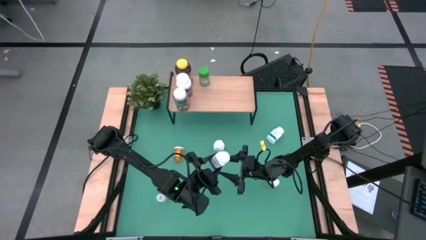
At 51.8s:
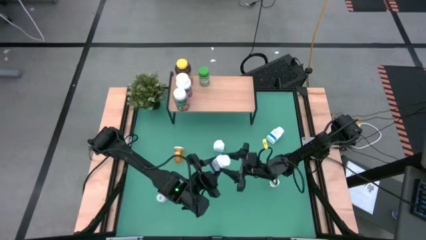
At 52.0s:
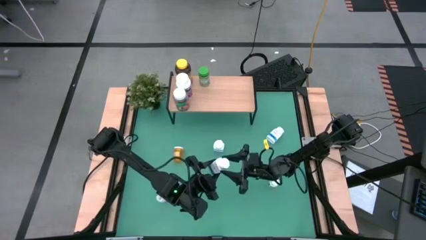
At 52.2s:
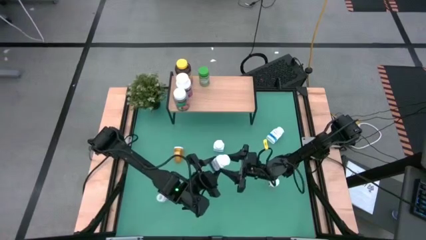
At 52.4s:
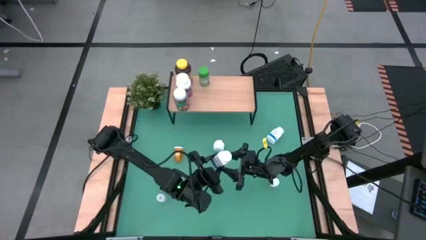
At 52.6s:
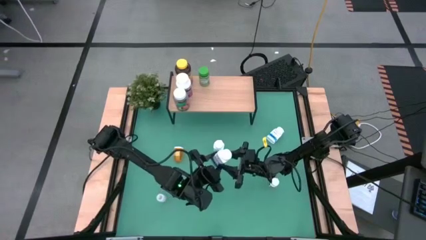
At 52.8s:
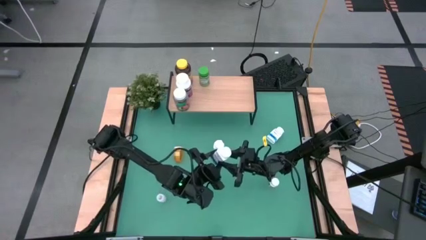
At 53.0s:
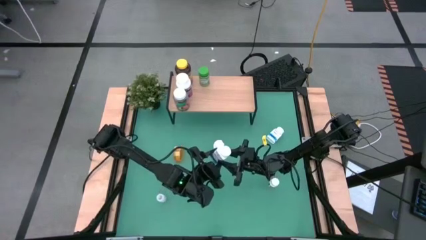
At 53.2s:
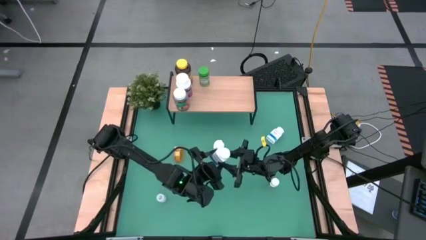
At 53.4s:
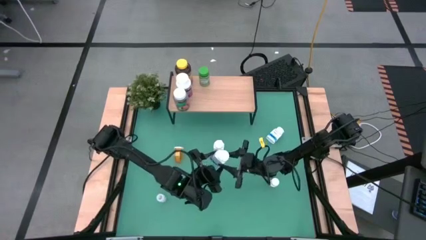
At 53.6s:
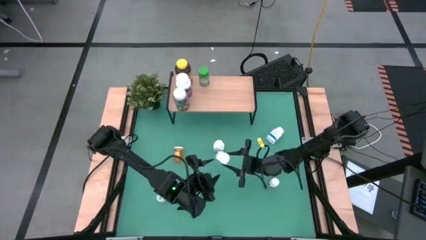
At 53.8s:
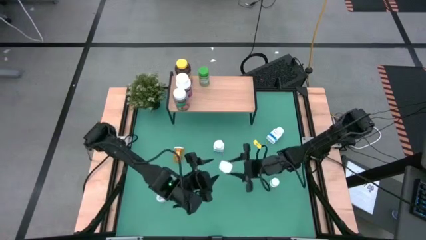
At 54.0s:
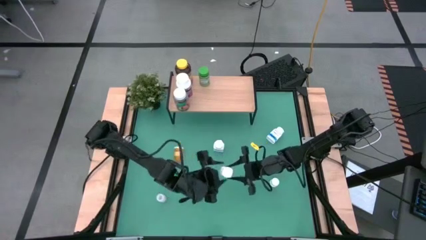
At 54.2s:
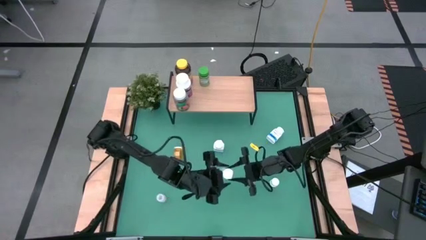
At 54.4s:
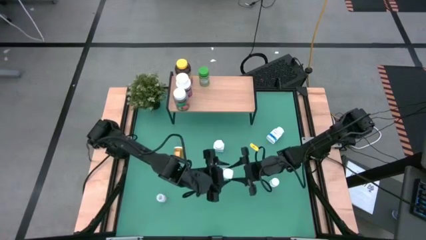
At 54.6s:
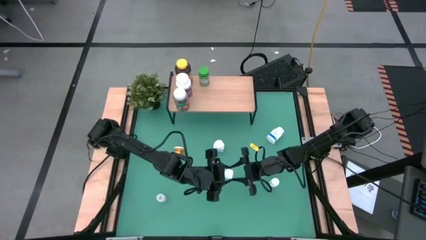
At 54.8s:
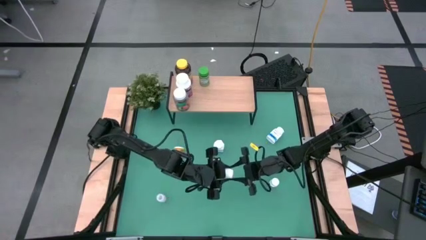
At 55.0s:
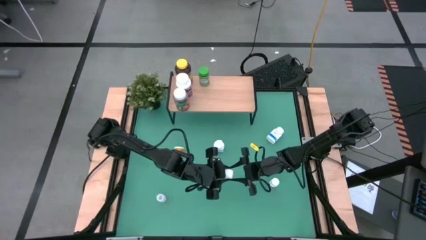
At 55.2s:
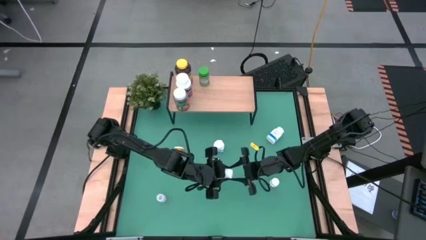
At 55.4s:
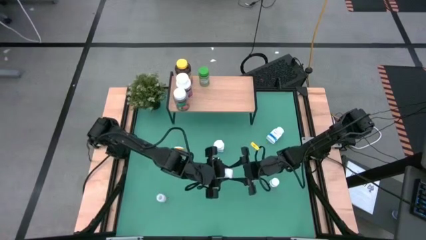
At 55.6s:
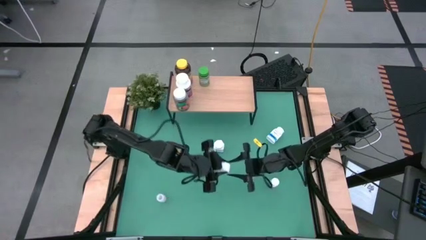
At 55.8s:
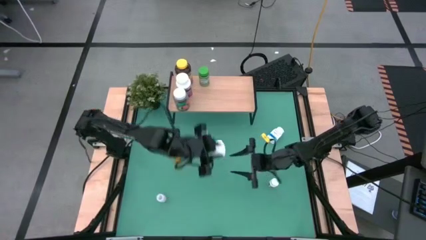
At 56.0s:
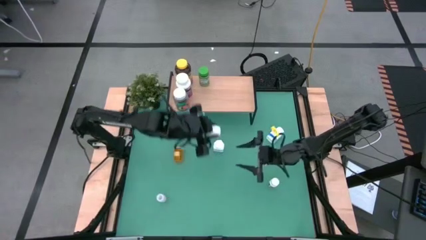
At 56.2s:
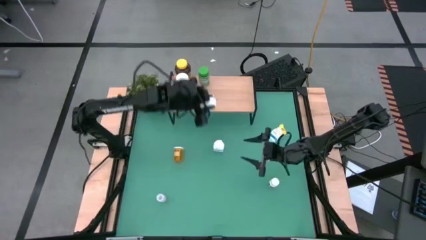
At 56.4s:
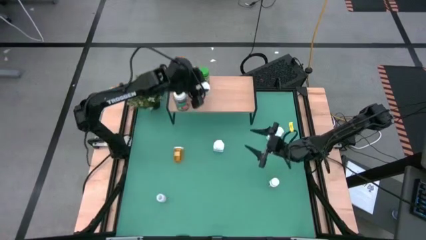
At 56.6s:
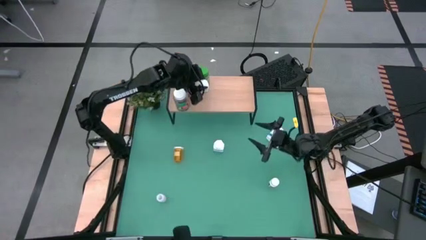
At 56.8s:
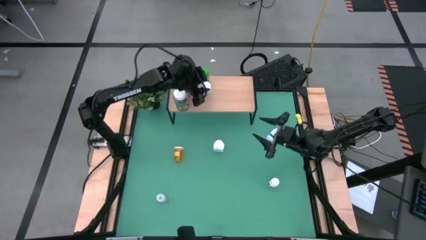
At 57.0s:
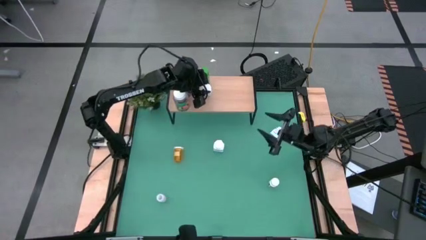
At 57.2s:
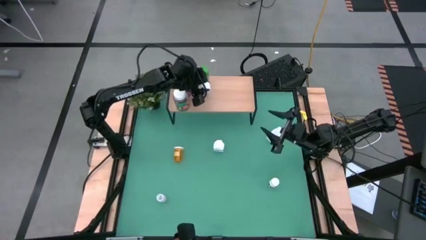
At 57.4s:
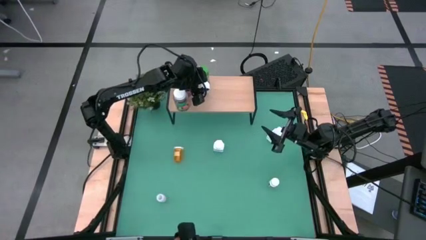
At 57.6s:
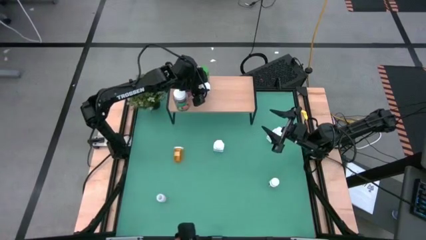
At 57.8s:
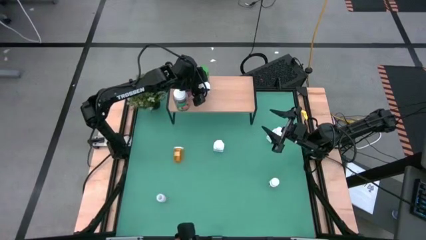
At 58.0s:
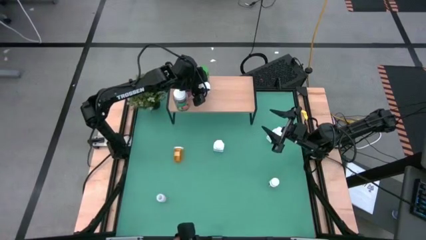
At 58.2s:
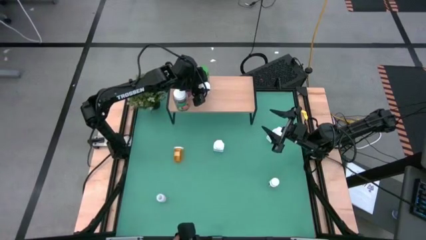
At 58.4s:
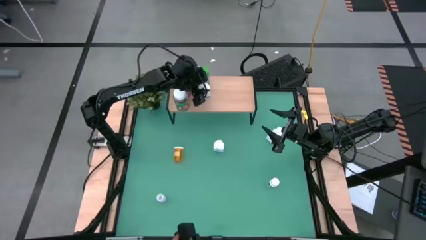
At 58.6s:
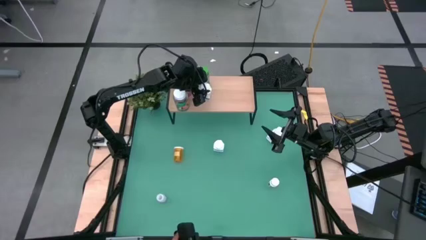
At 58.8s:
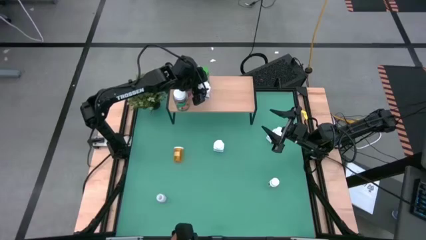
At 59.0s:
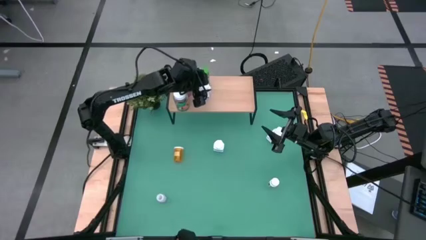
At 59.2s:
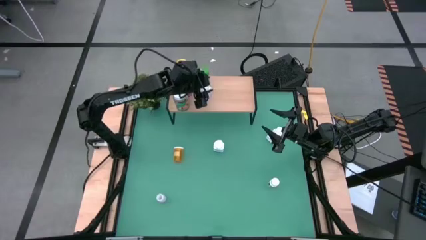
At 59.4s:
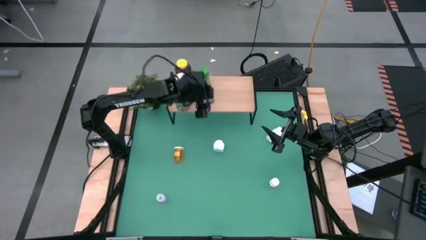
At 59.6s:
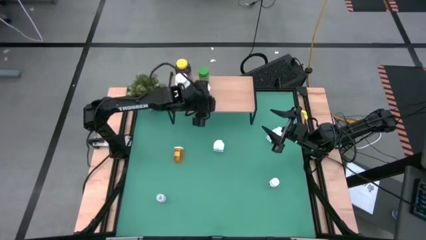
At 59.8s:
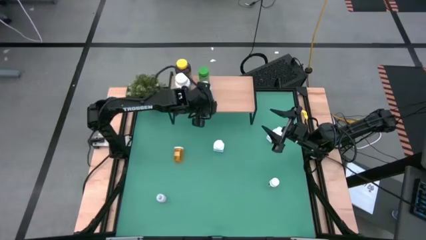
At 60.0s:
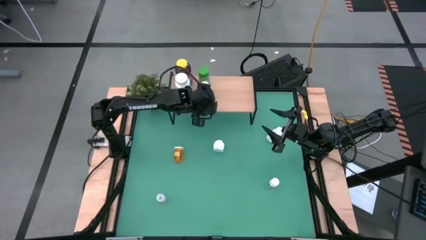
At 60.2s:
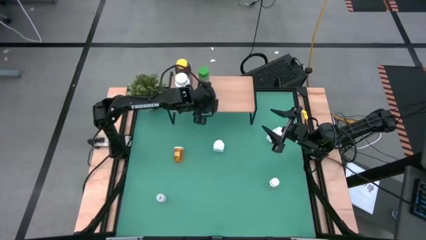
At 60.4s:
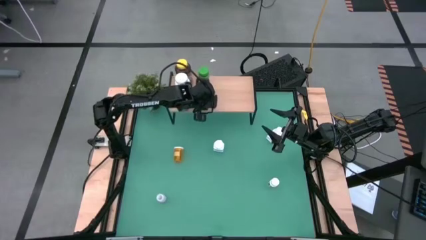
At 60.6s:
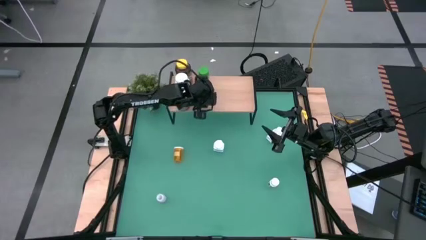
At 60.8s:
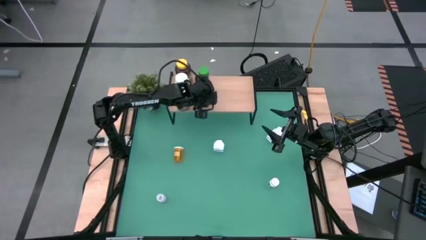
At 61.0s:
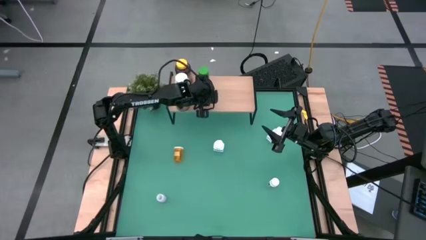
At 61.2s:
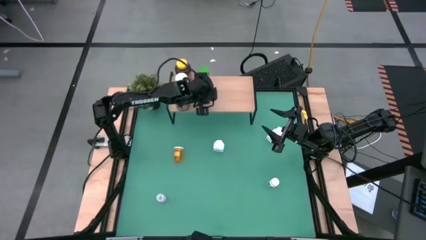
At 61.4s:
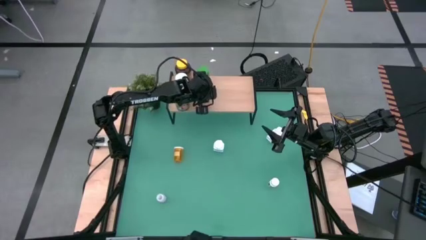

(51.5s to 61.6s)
Task: Pick and place medicine bottles onto shelf by color
Put the bottom white and blue pill bottle on the shelf

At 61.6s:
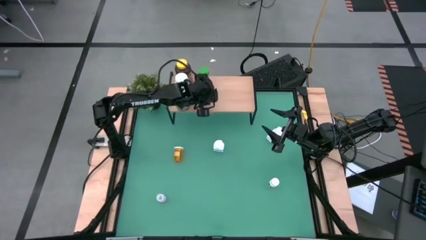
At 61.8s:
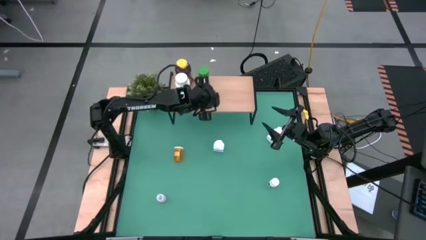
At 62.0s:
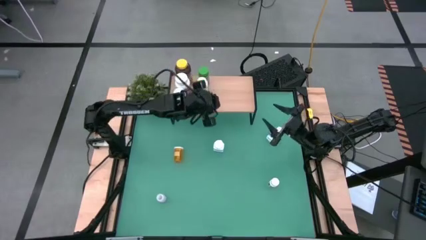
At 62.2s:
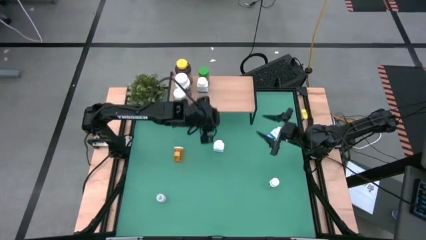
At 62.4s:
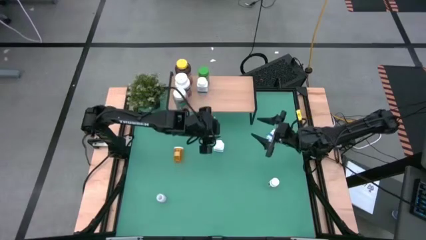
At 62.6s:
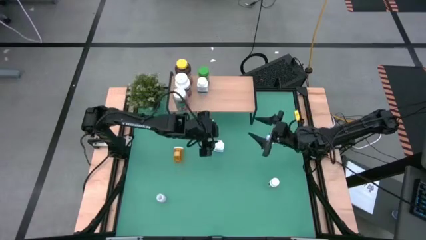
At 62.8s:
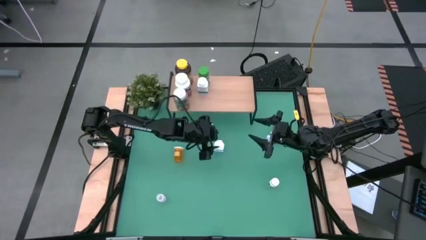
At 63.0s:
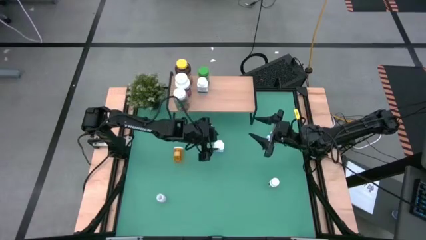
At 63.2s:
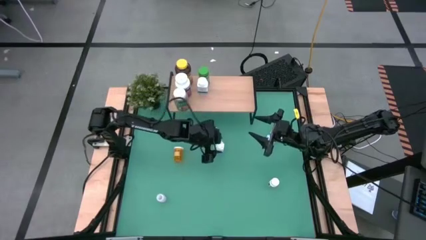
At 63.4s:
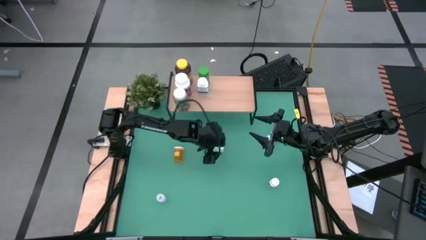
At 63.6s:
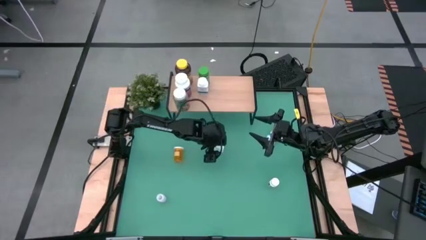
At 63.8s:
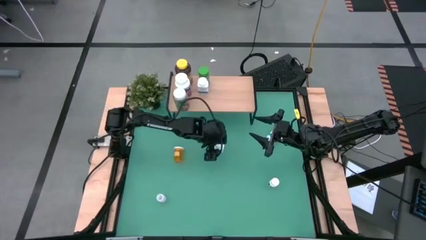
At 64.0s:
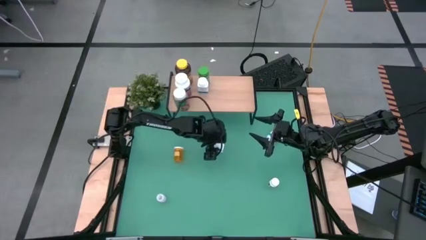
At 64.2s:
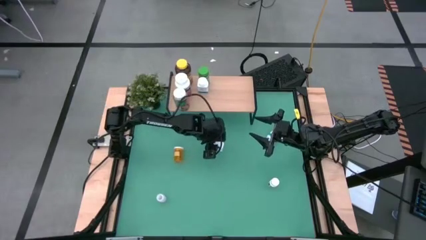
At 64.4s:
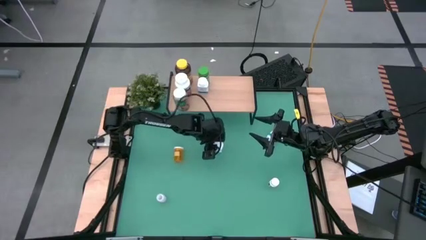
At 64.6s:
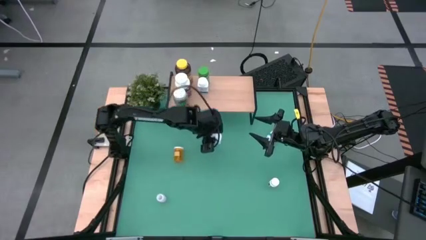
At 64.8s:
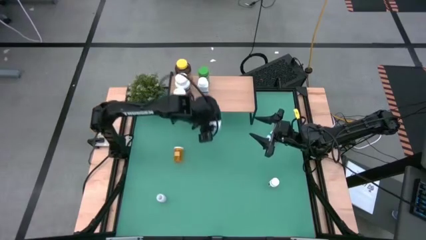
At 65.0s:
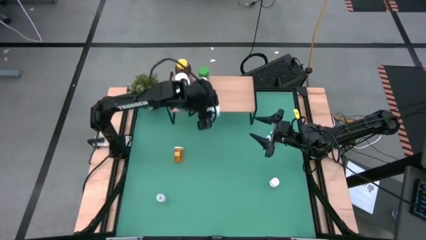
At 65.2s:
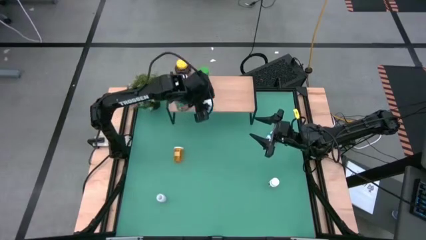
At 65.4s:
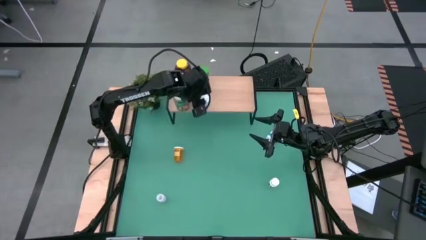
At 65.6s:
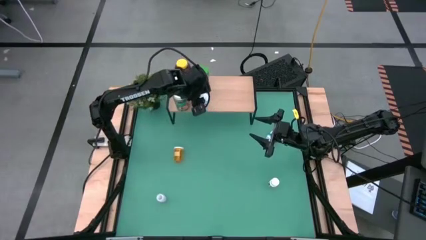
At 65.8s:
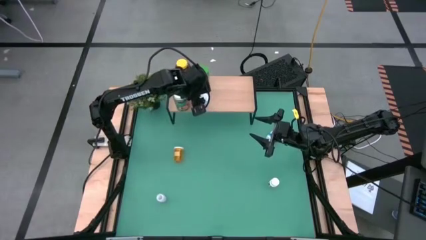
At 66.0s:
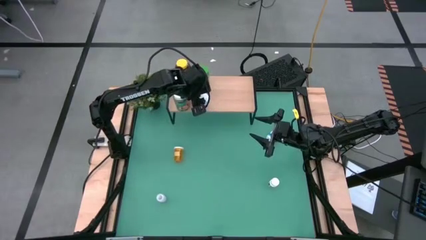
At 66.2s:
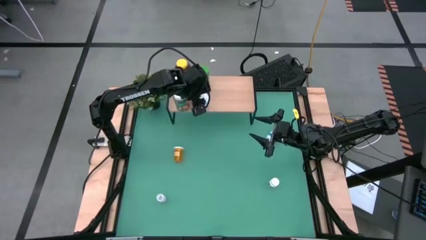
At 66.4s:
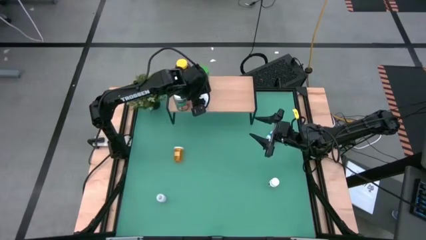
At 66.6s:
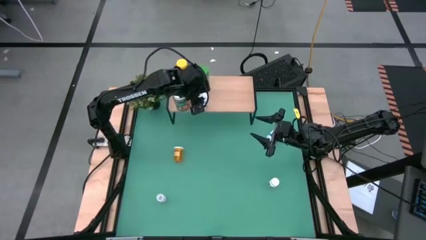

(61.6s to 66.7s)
Put the left white and blue pill bottle on the shelf

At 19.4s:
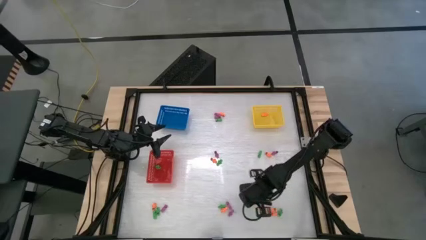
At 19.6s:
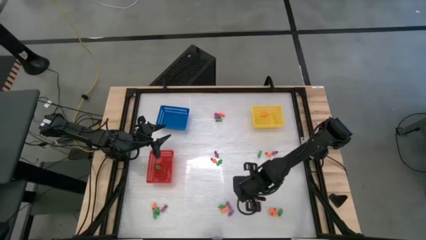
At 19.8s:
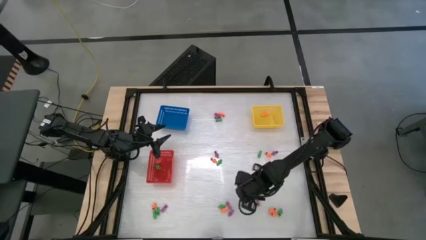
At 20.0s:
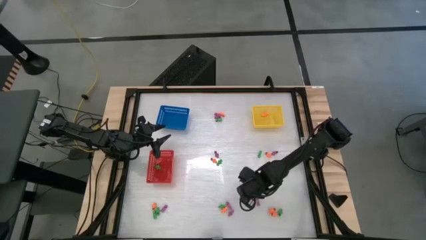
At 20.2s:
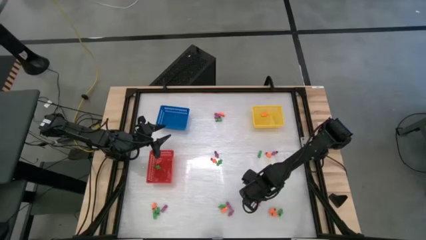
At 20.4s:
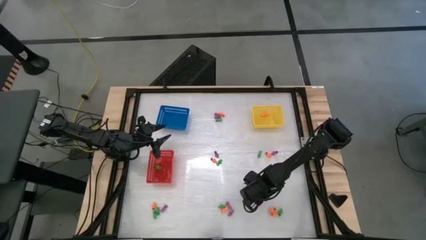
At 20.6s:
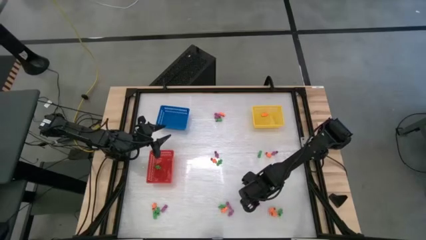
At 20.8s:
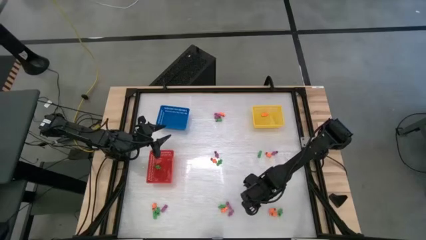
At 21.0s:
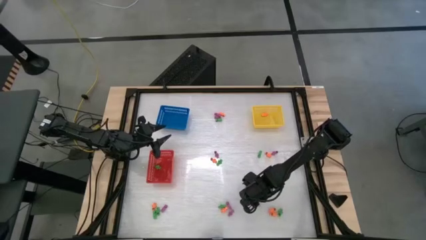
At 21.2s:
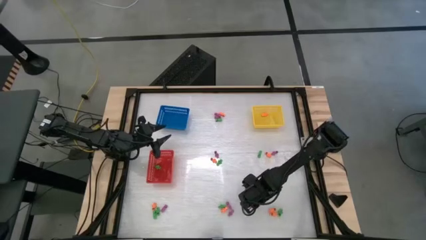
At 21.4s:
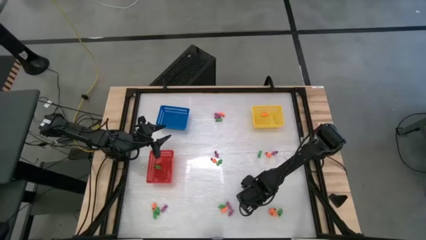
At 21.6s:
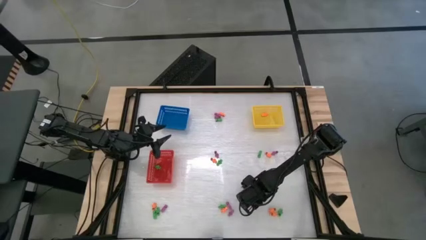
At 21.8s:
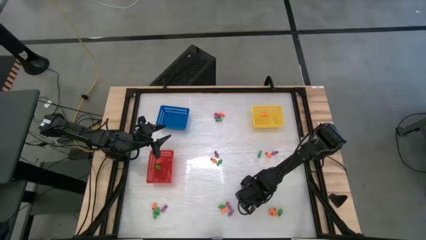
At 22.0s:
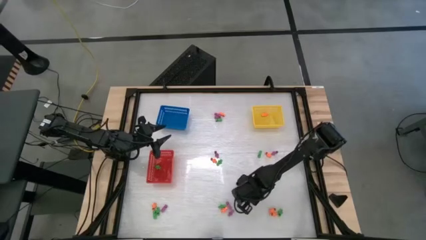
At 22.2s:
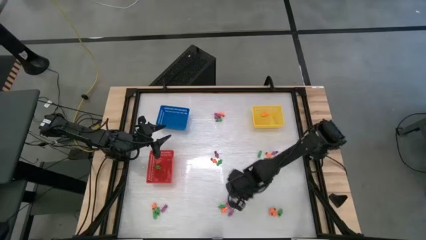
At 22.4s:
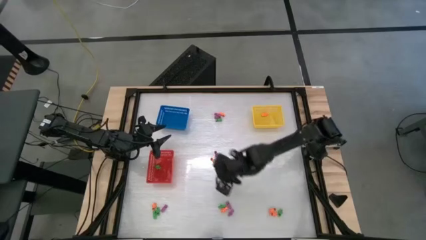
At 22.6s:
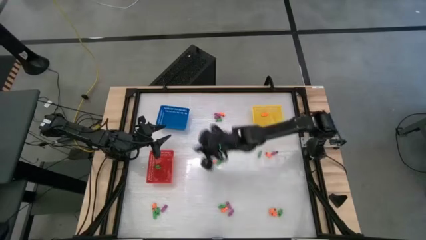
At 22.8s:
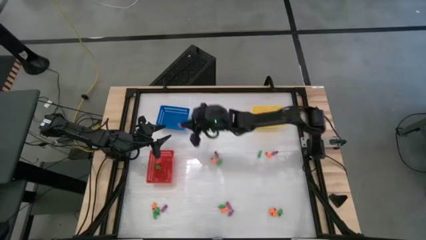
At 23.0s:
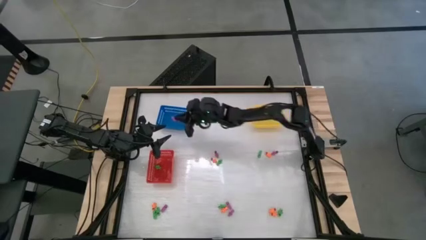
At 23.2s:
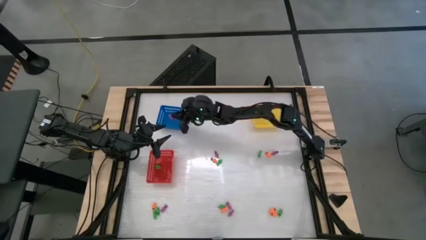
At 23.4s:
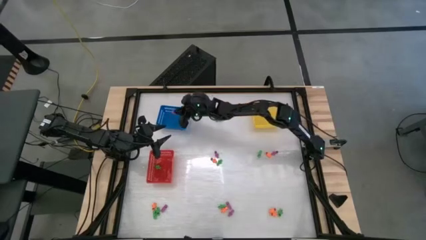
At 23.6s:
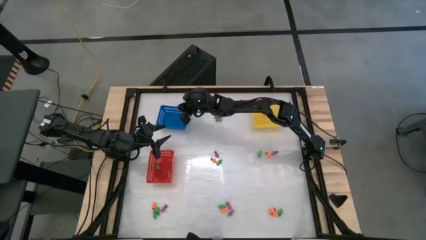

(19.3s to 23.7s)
Task: Sort Halloween decoration
Put the violet skeleton toy into the blue bin
